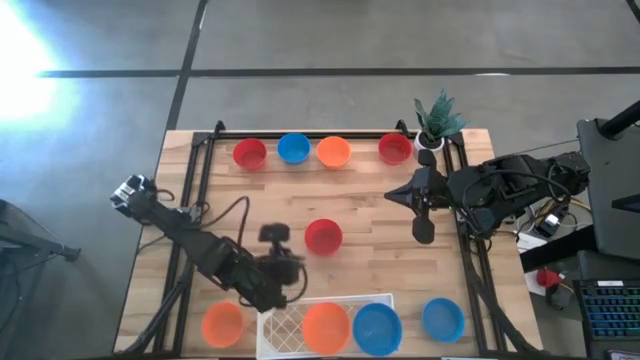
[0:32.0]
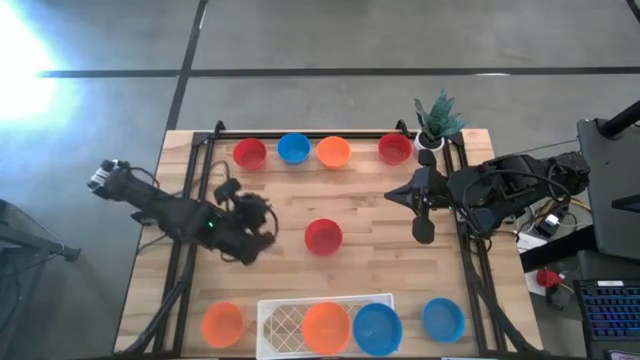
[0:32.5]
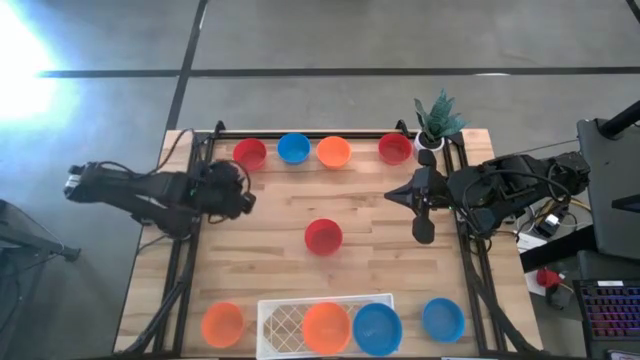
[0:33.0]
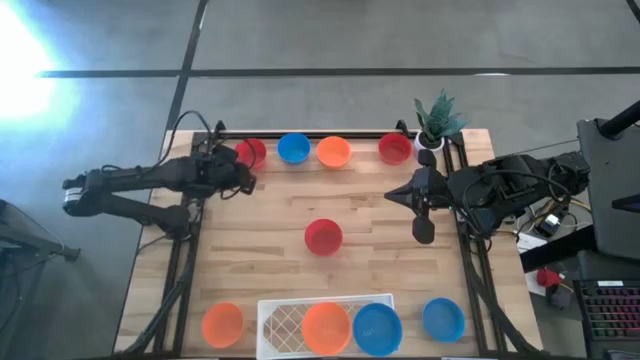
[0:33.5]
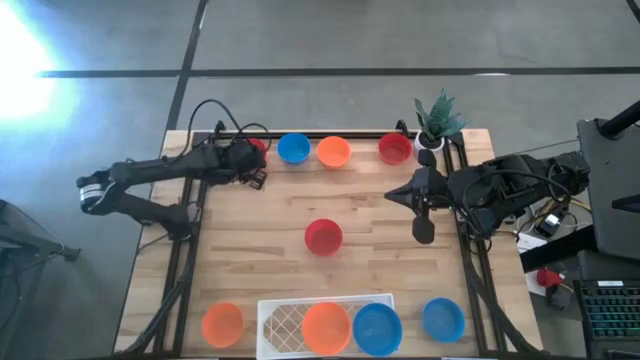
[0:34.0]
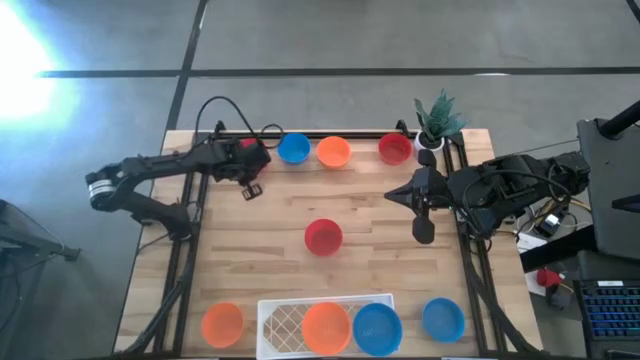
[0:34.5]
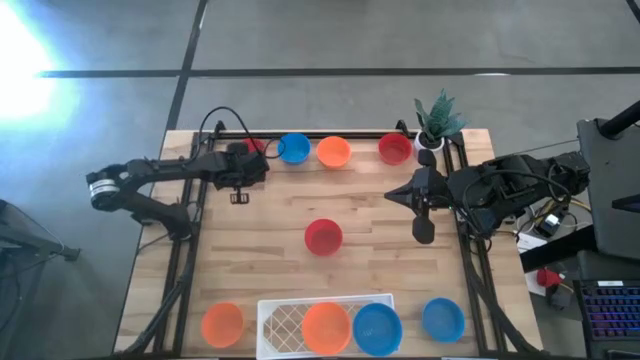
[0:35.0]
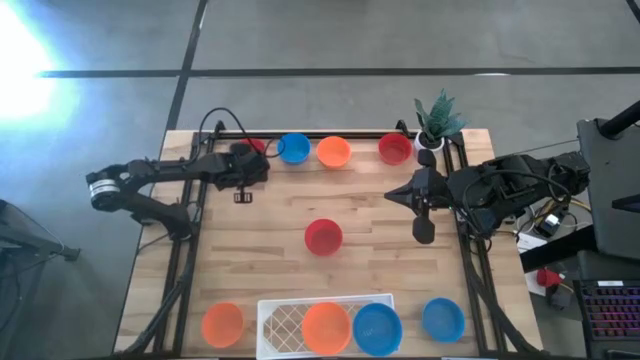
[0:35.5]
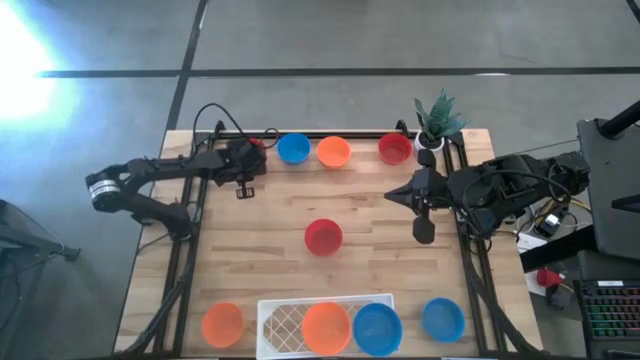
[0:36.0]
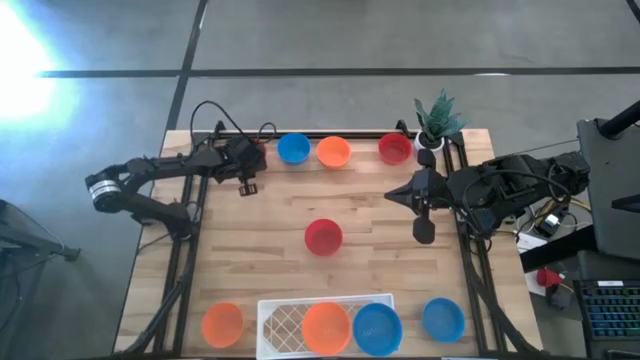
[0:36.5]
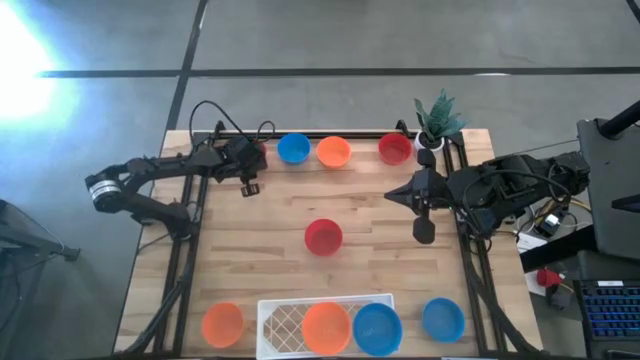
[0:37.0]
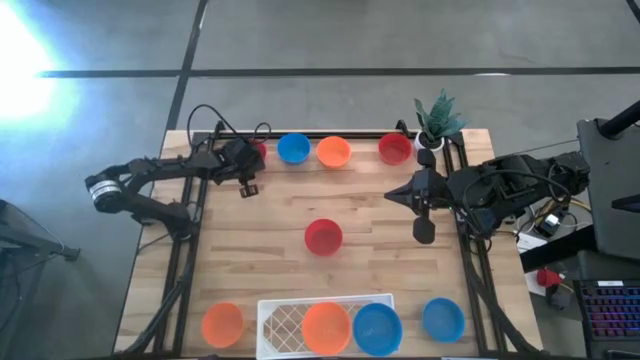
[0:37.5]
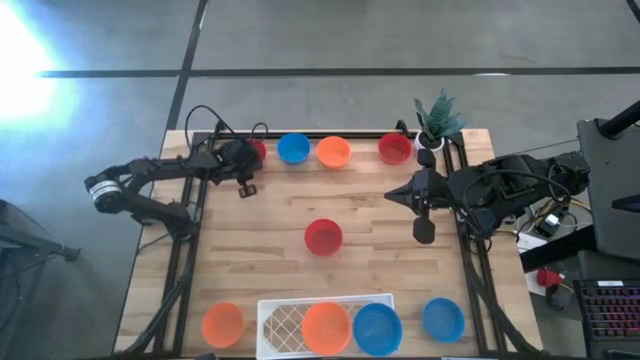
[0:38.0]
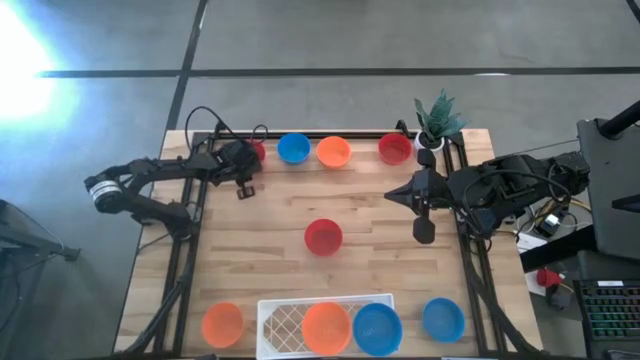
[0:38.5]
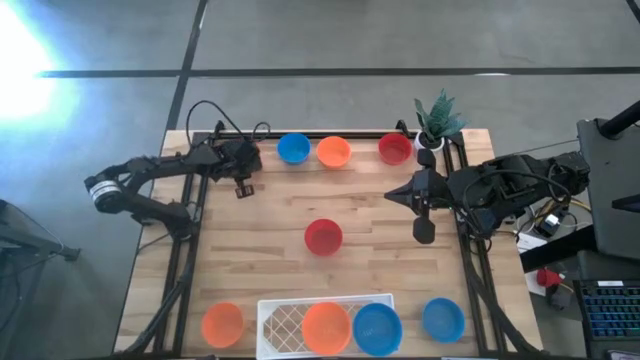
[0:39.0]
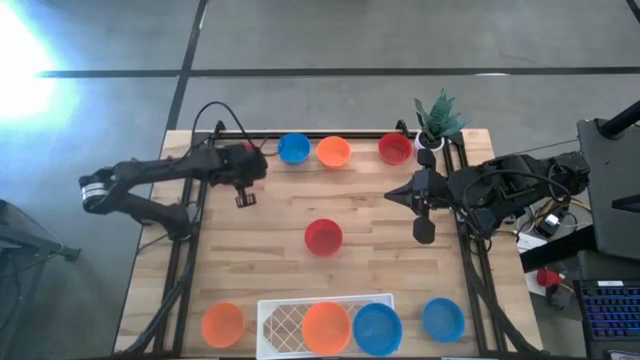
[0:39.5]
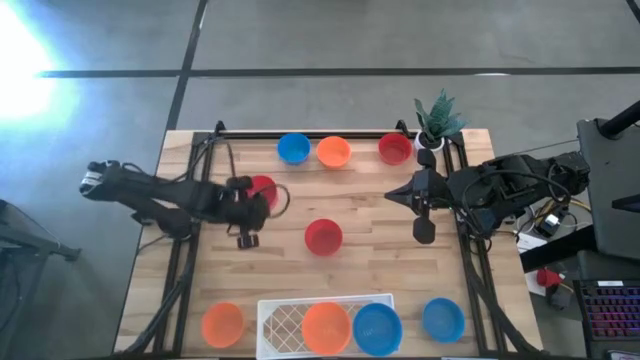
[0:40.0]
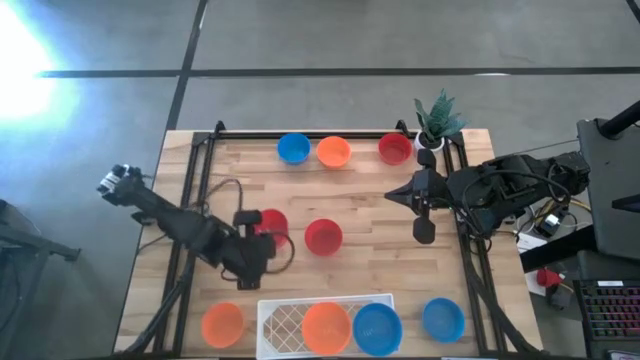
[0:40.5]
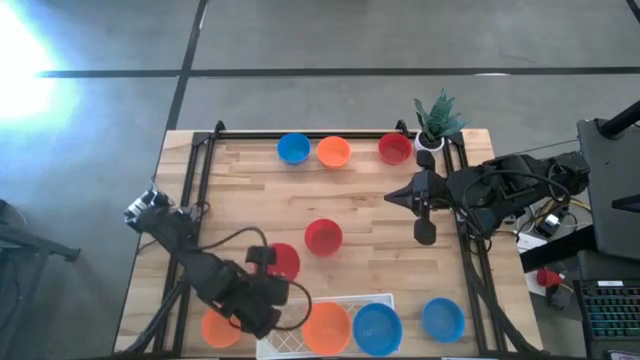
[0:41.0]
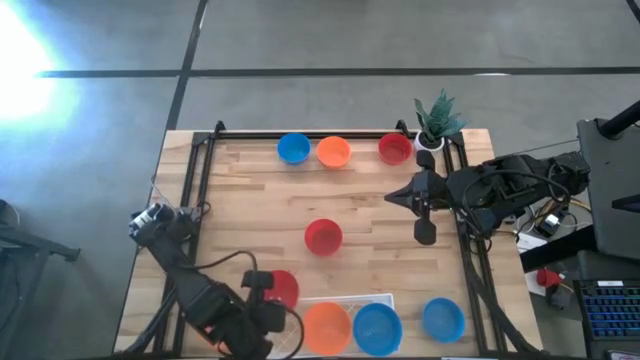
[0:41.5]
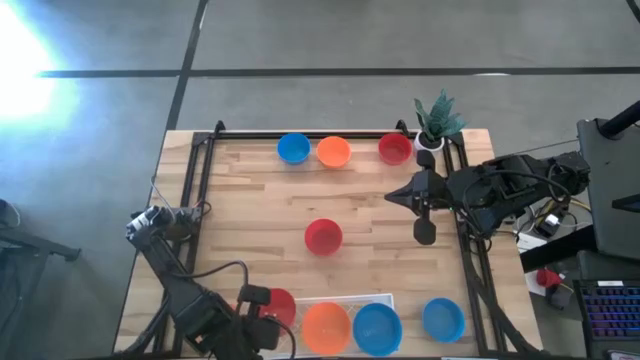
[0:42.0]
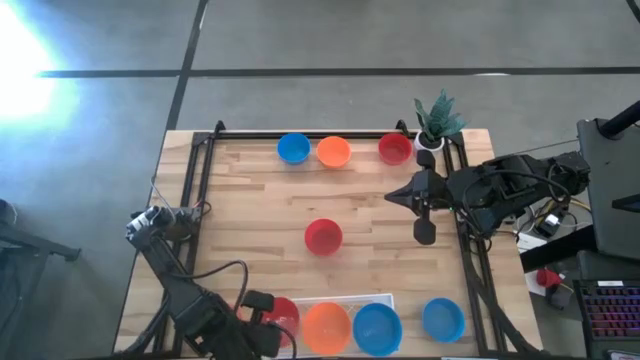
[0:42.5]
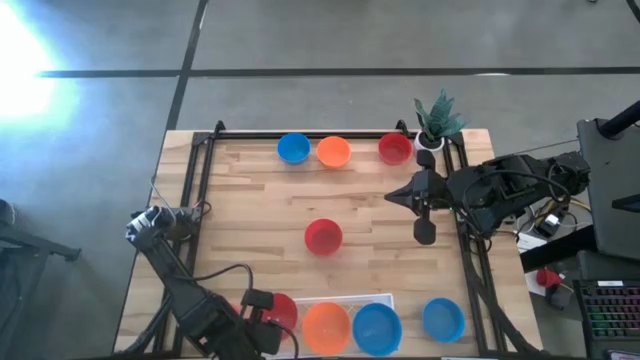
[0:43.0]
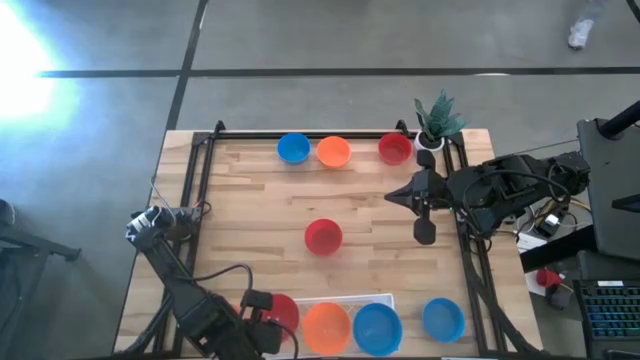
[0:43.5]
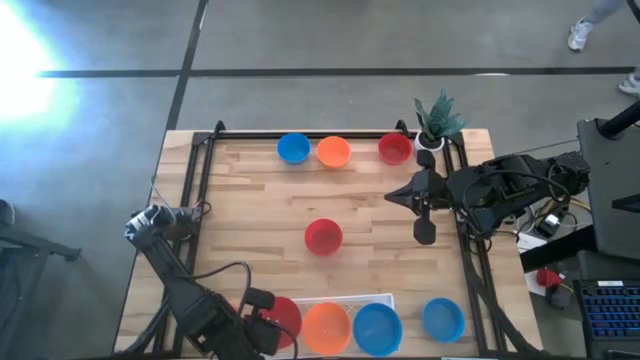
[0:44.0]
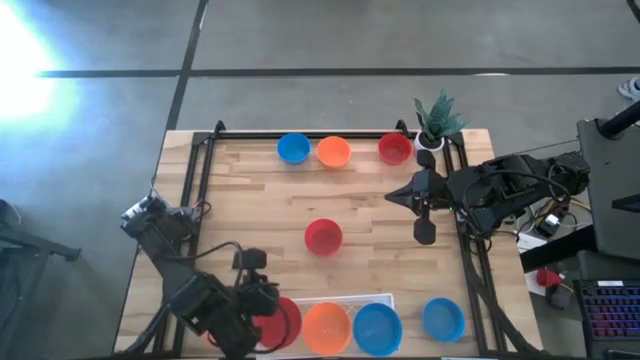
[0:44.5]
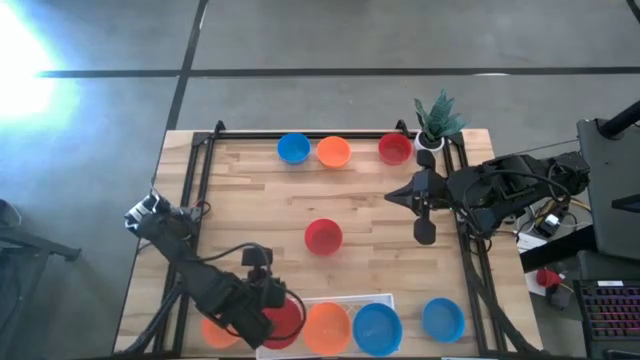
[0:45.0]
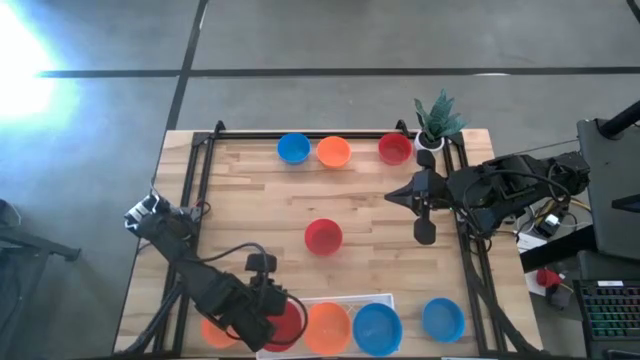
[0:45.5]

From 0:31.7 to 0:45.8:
Task: Pick & Place Mini bowls
Put the top left red bowl on the shelf

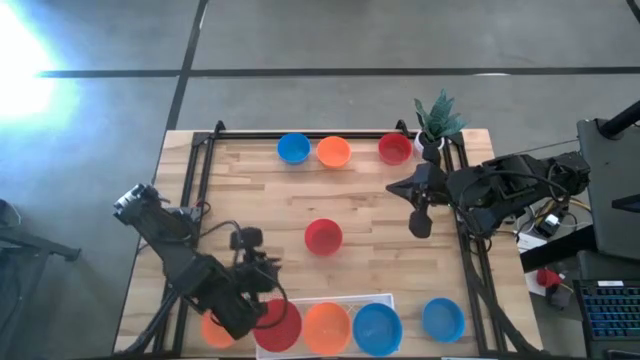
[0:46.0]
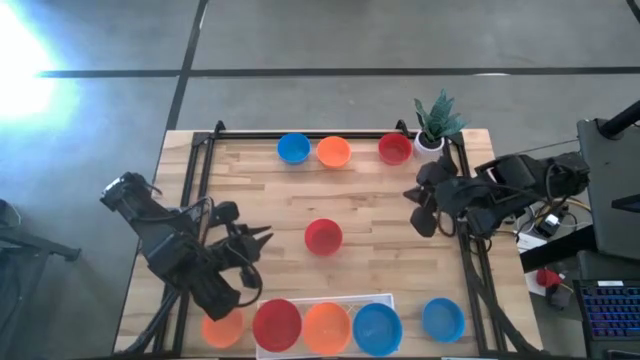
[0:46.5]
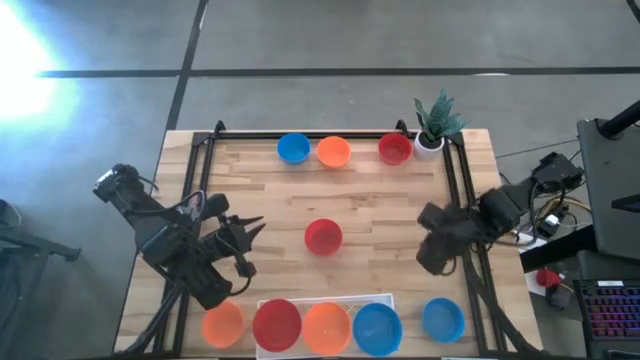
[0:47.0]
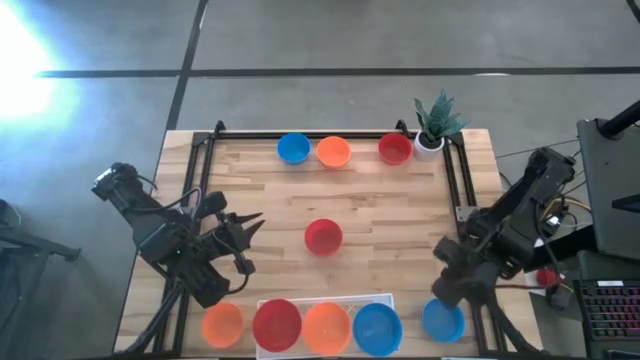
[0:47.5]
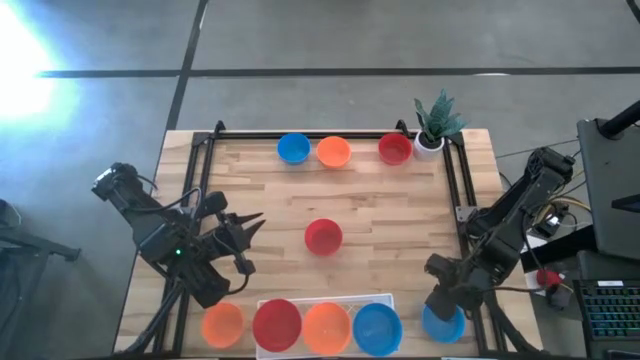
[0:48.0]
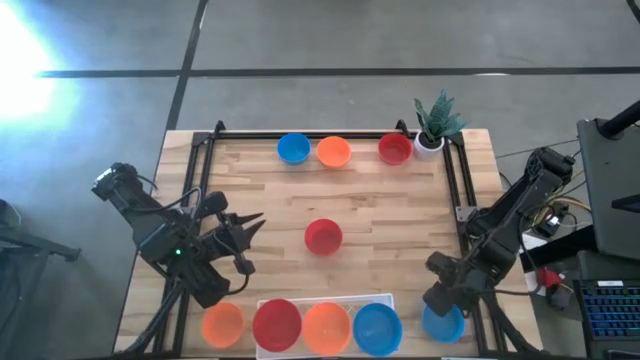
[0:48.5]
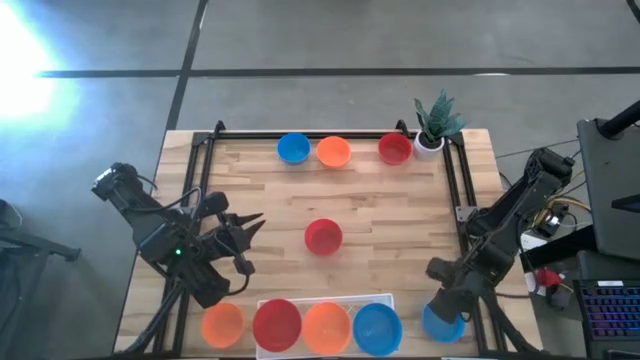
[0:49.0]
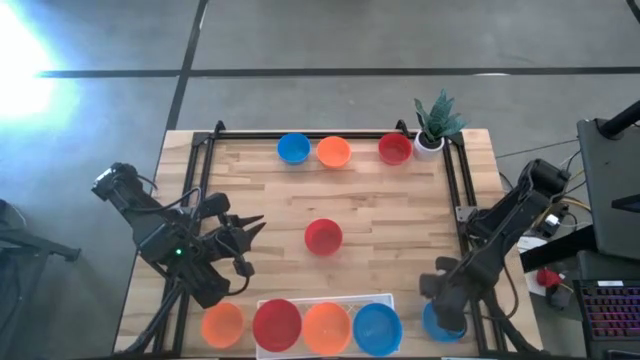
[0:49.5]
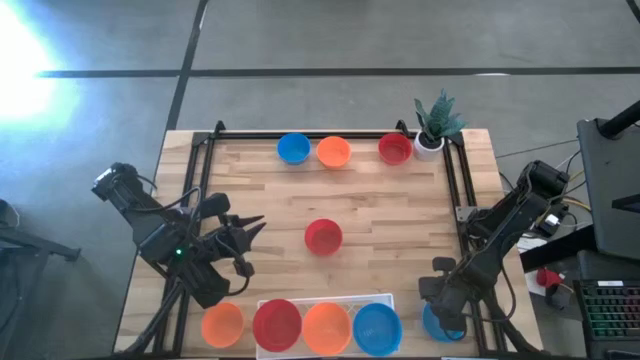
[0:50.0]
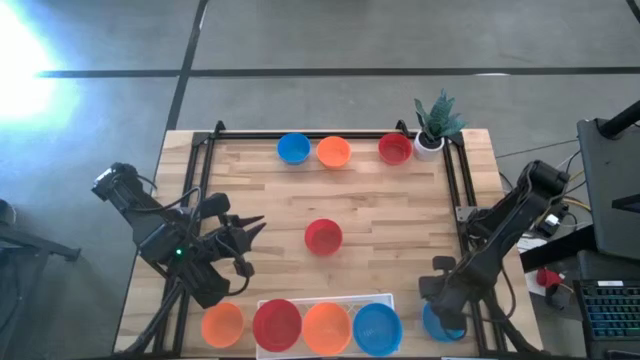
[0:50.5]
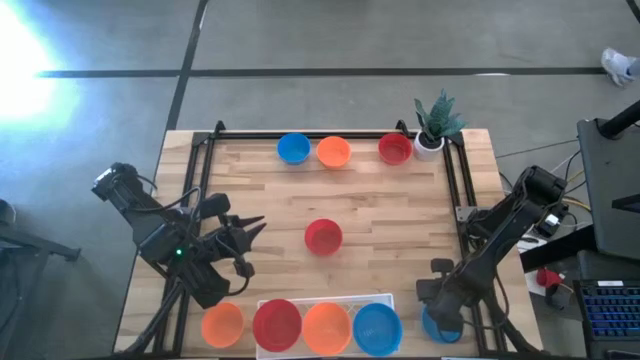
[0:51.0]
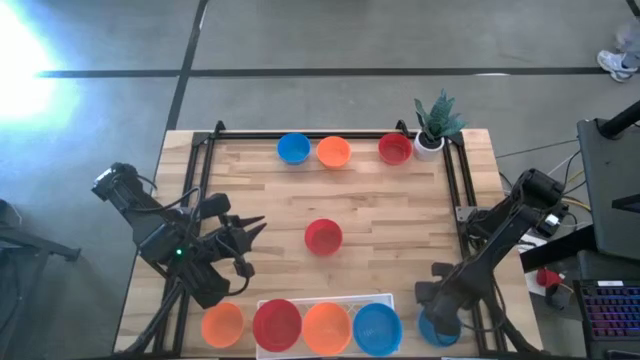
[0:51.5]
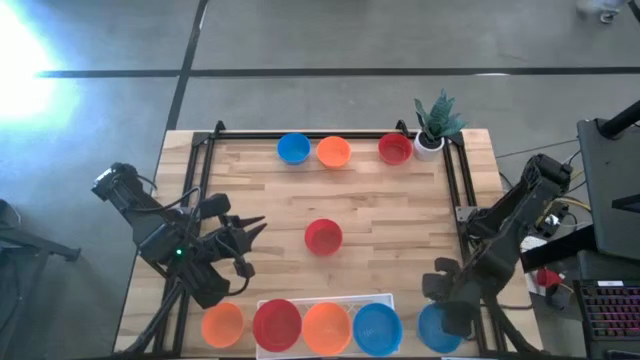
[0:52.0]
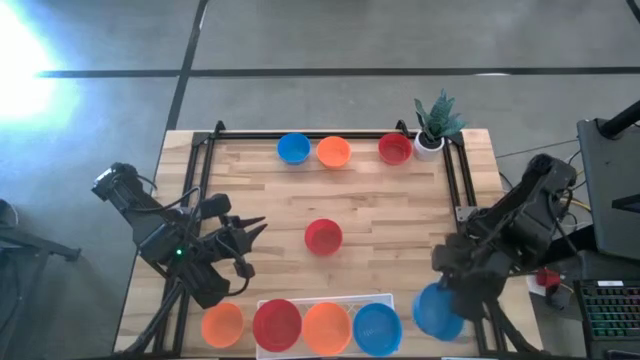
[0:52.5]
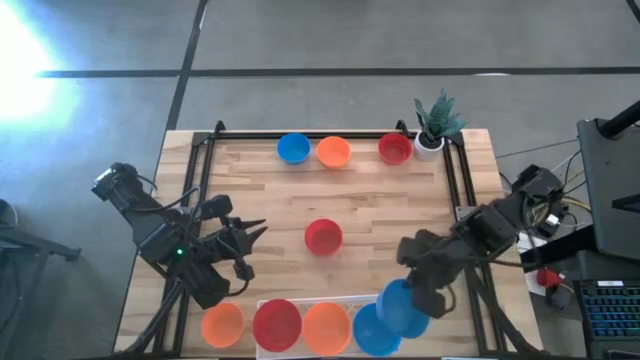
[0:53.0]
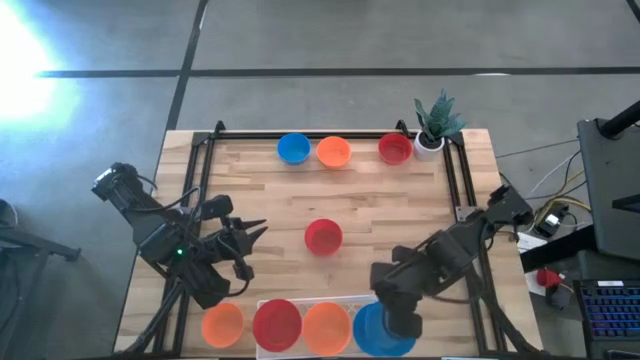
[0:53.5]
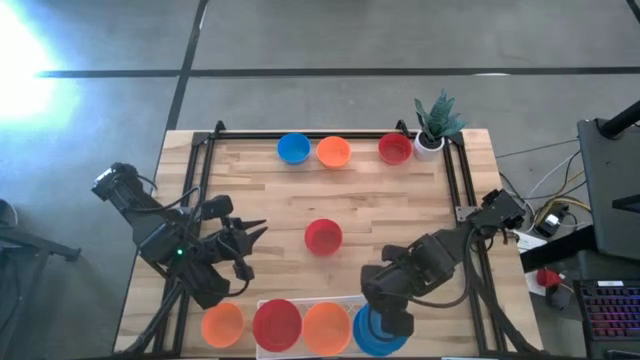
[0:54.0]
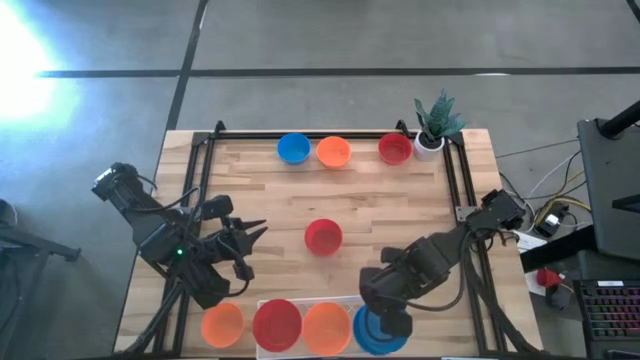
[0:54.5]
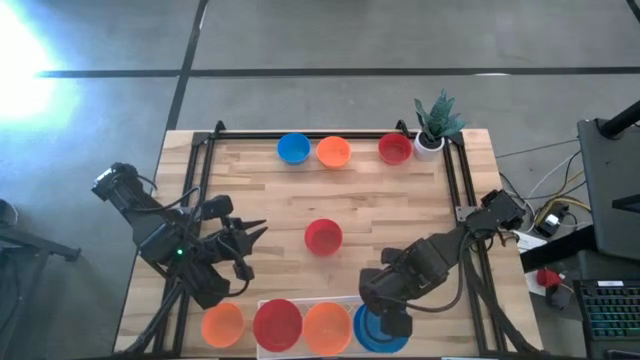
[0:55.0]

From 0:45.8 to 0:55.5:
Stack the bottom blue bowl on top of the other blue bowl on the shelf
